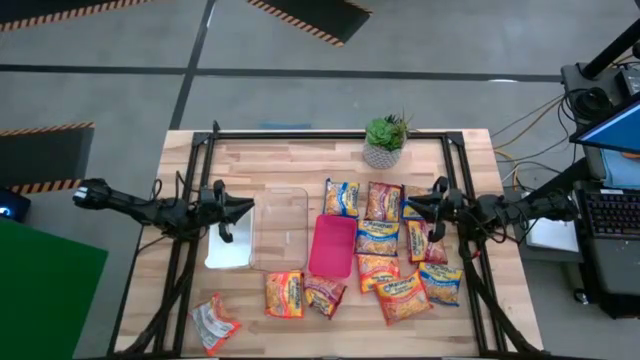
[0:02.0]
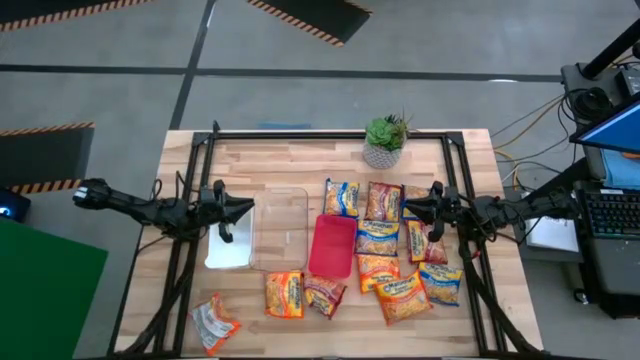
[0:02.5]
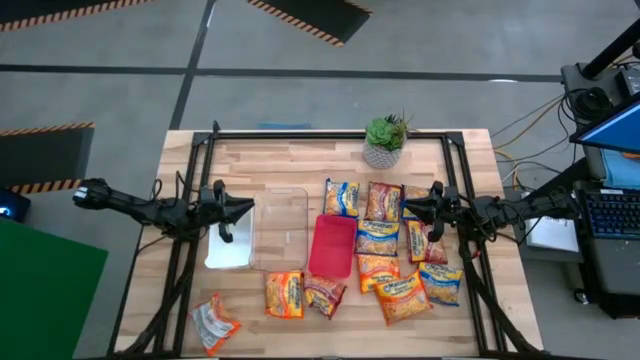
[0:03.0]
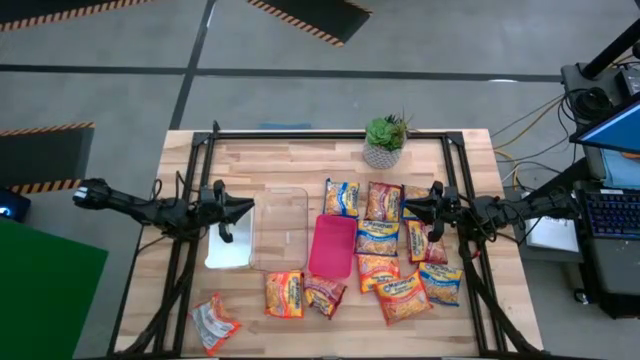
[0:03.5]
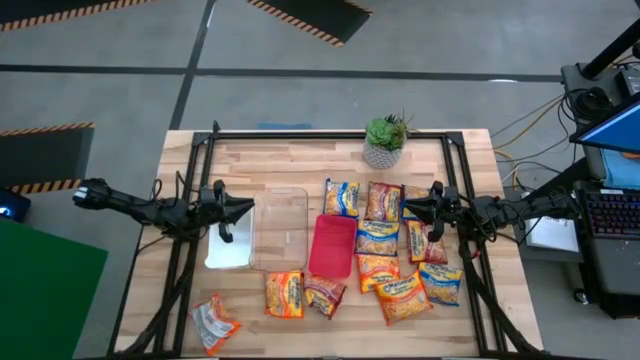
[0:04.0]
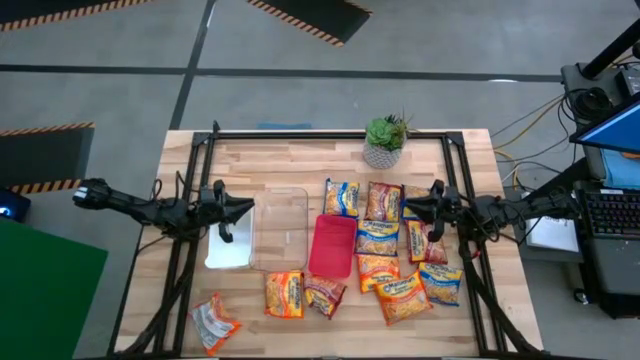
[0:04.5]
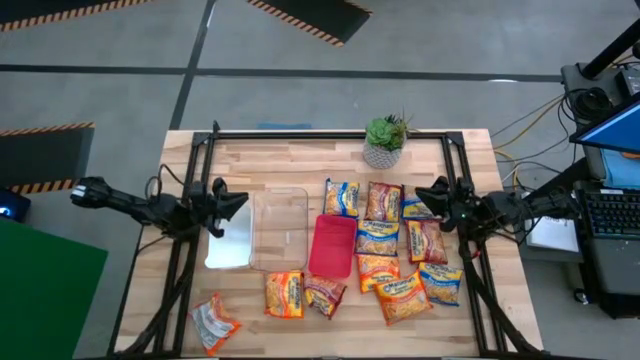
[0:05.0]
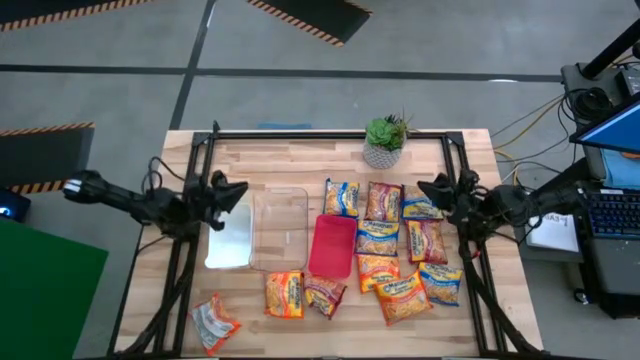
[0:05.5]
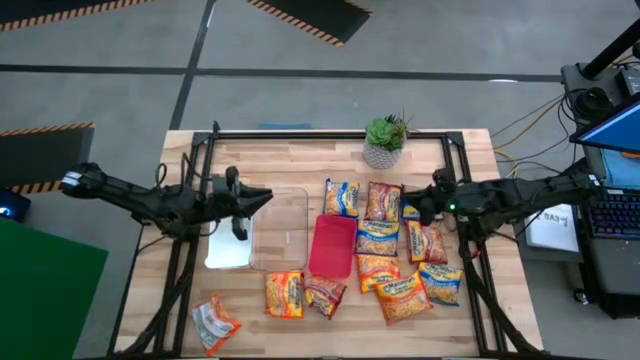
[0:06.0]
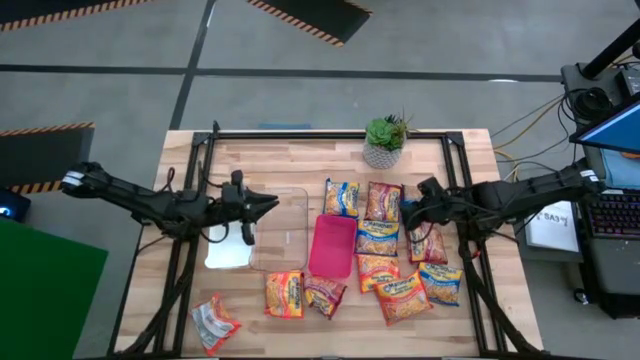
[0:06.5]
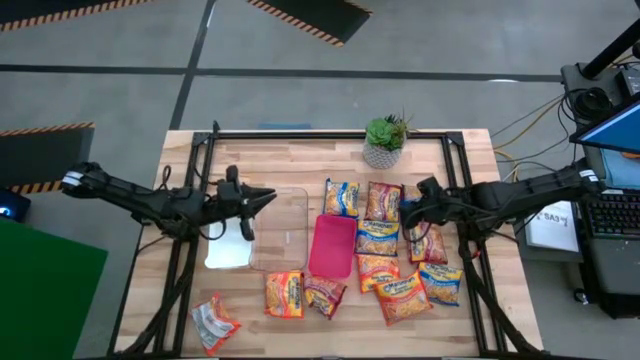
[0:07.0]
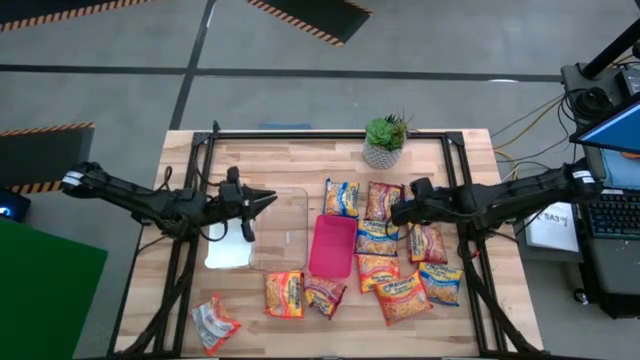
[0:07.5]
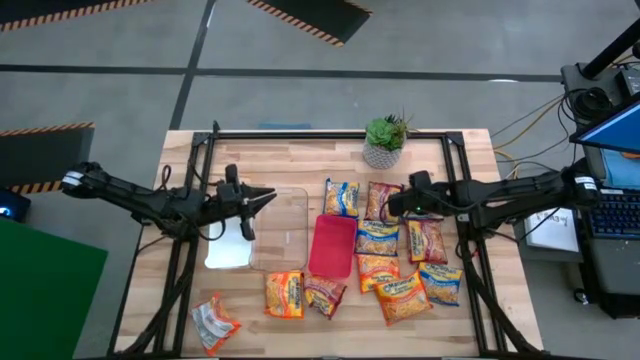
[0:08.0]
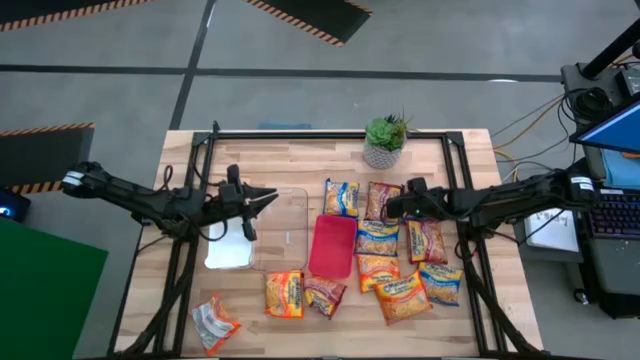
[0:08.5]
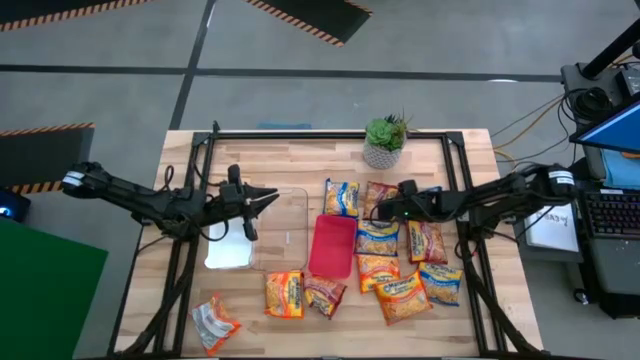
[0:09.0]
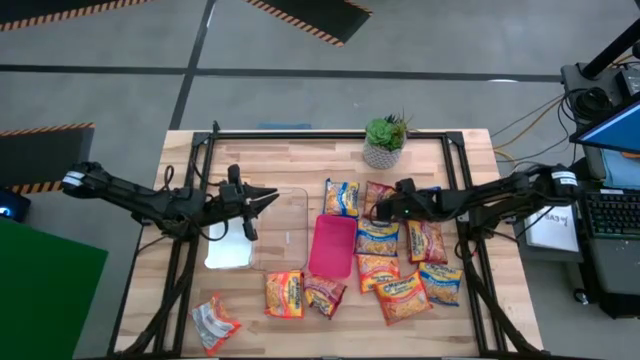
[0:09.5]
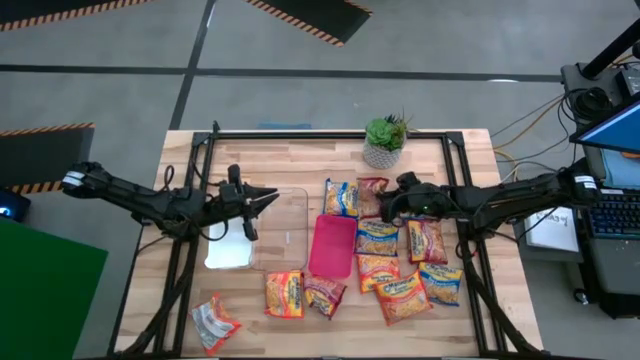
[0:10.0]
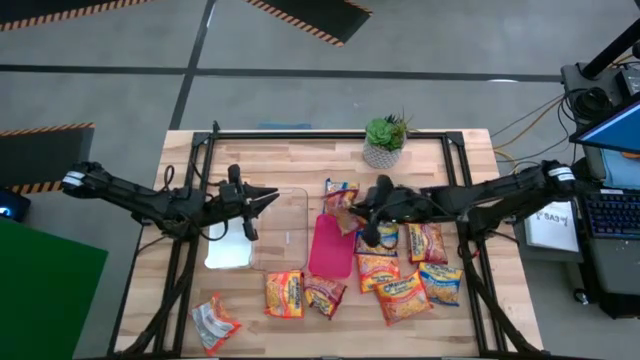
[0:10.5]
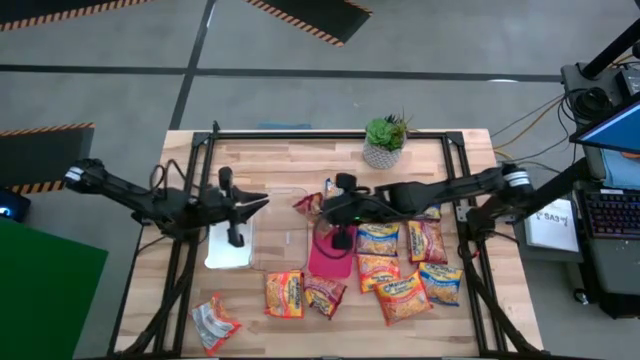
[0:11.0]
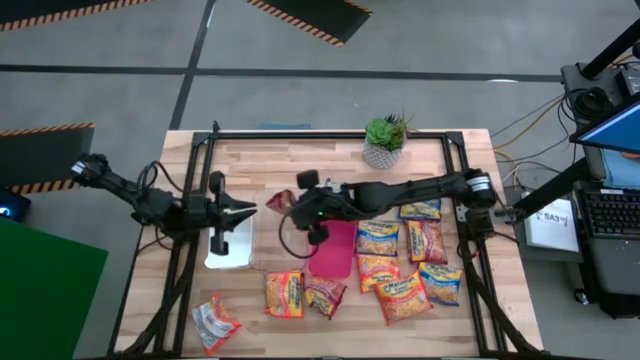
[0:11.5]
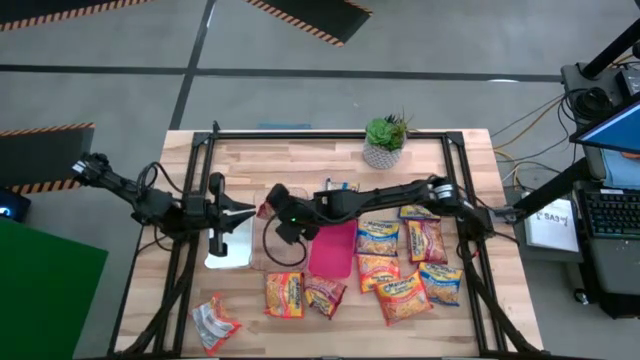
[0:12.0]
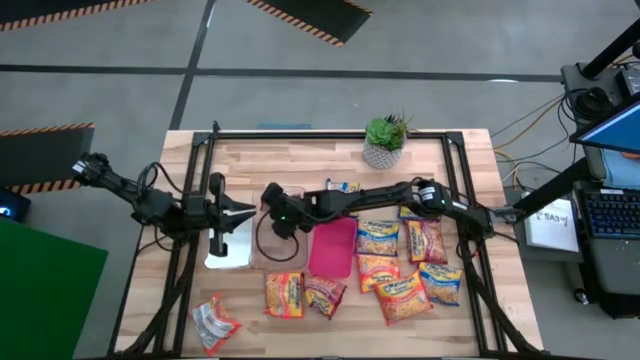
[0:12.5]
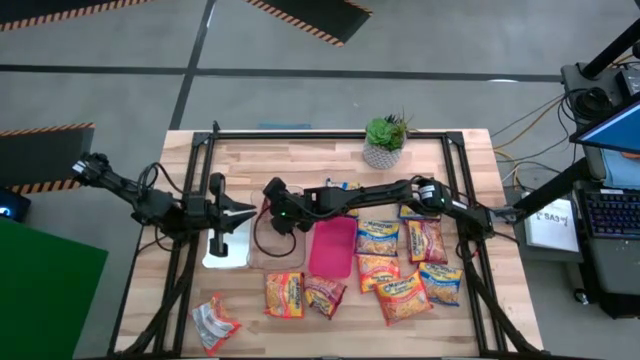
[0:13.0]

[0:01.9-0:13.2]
Task: Sort Maruchan noodles
Put the red noodle pack into the transparent bin

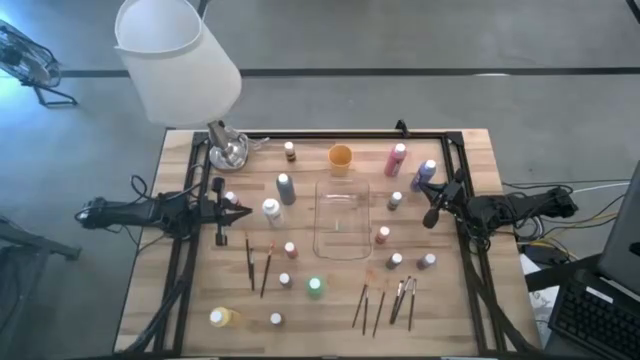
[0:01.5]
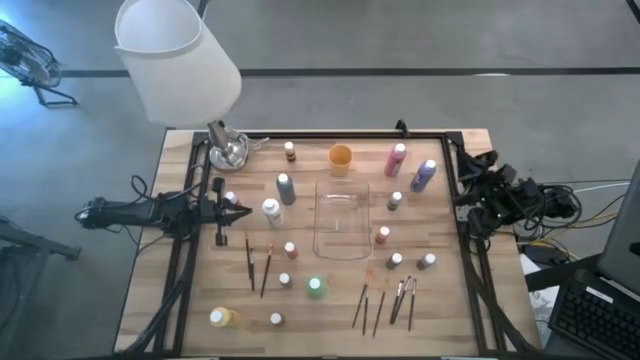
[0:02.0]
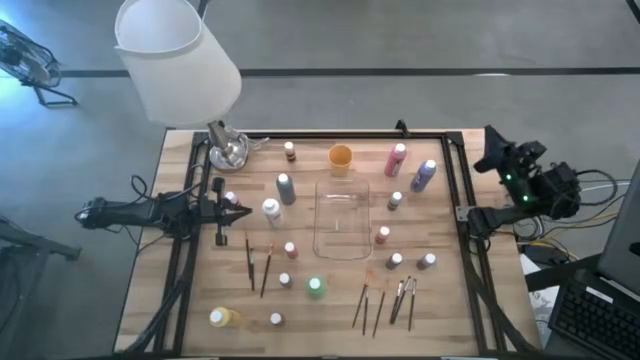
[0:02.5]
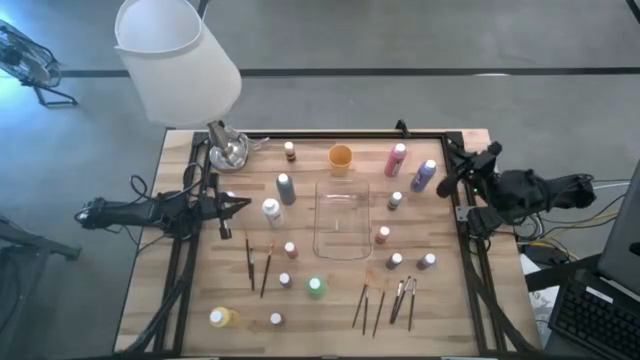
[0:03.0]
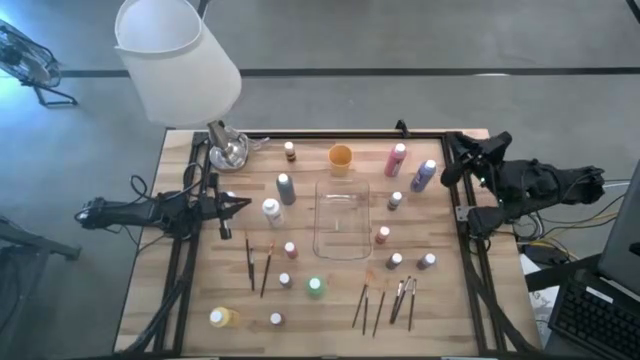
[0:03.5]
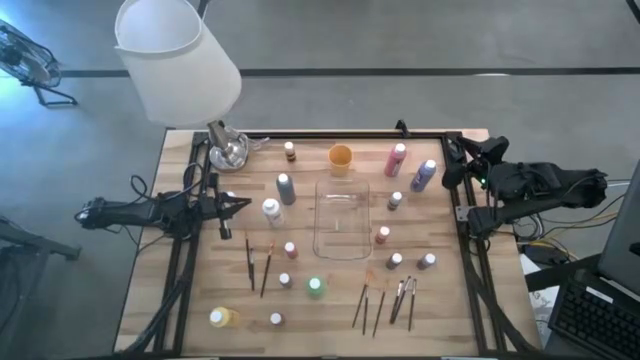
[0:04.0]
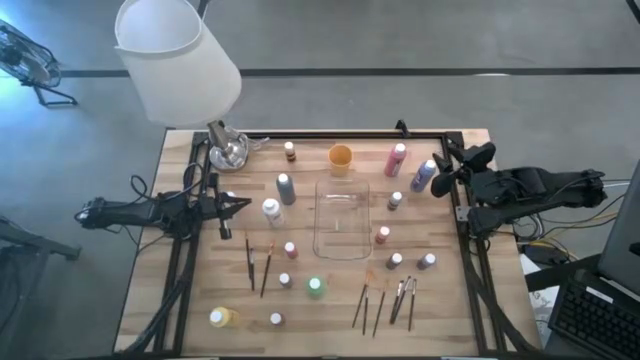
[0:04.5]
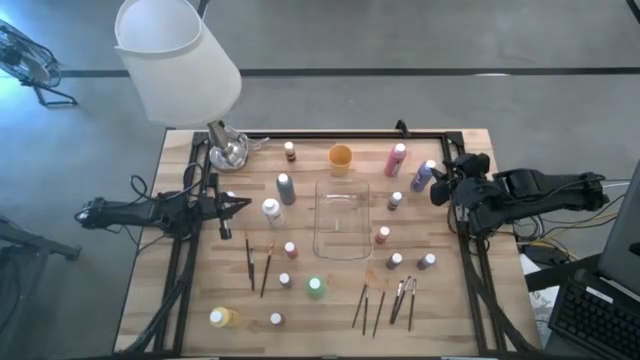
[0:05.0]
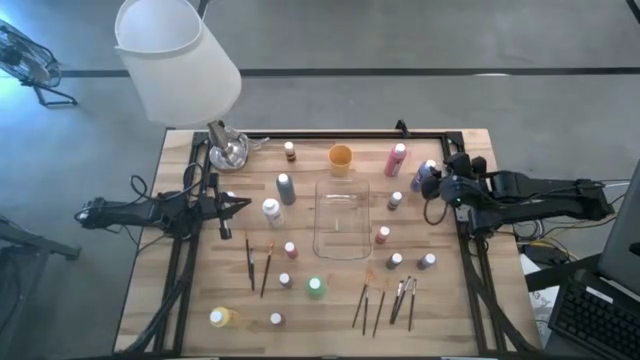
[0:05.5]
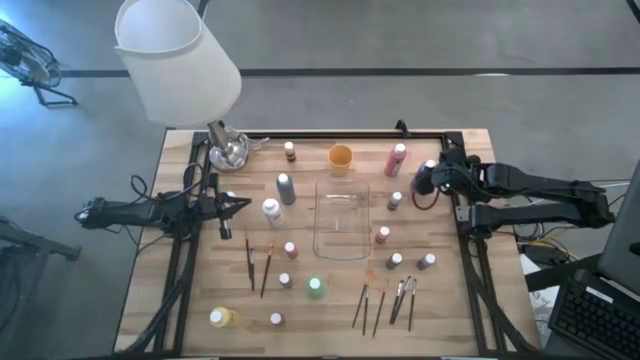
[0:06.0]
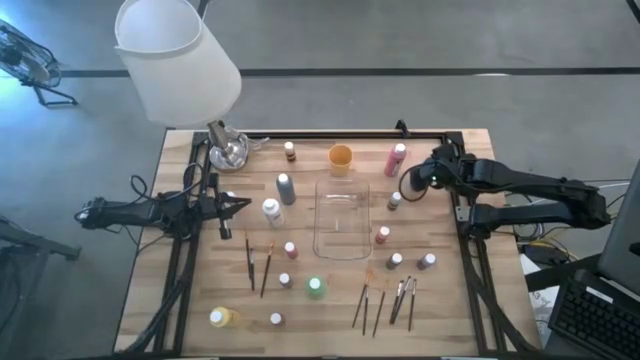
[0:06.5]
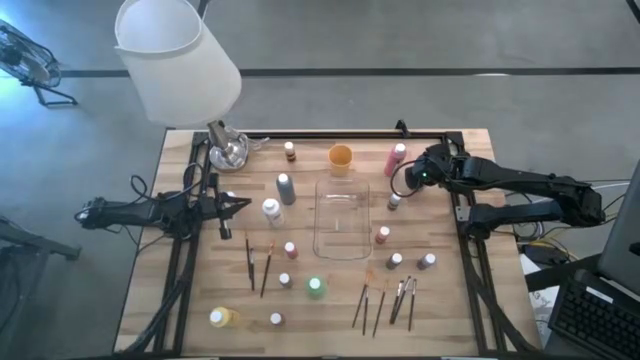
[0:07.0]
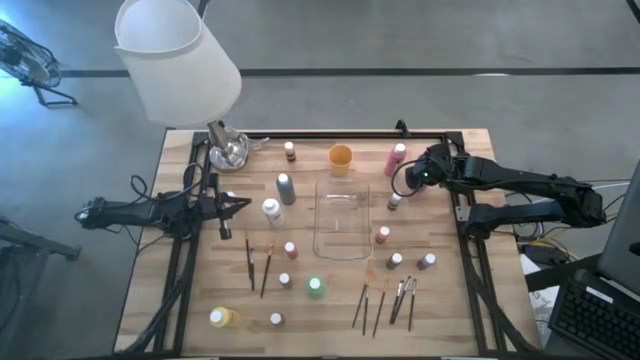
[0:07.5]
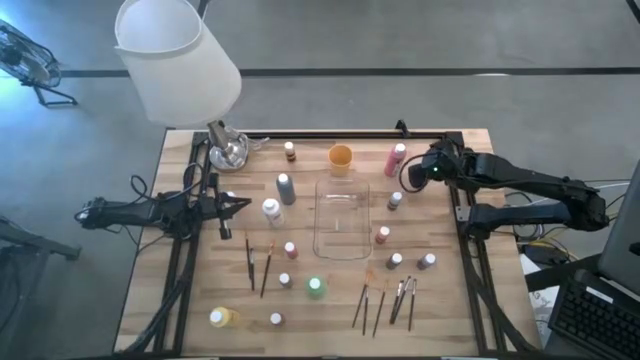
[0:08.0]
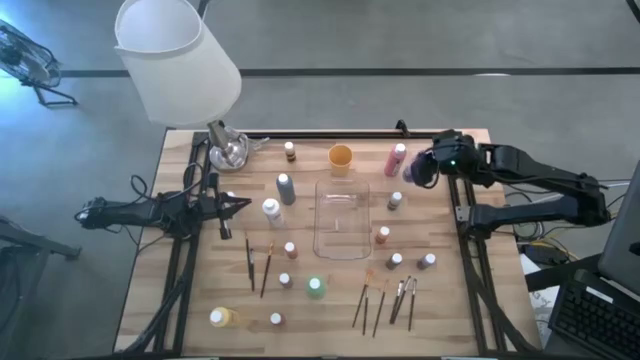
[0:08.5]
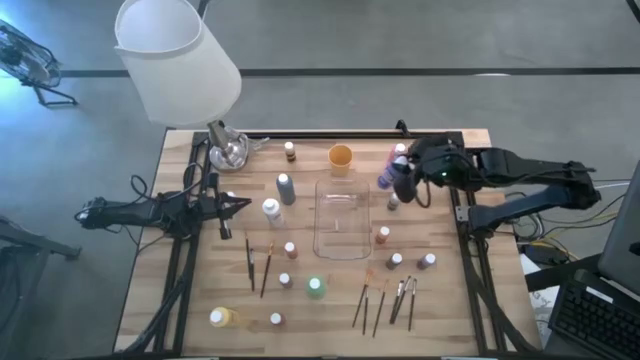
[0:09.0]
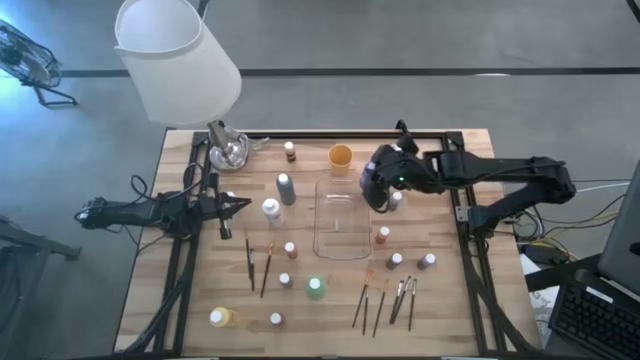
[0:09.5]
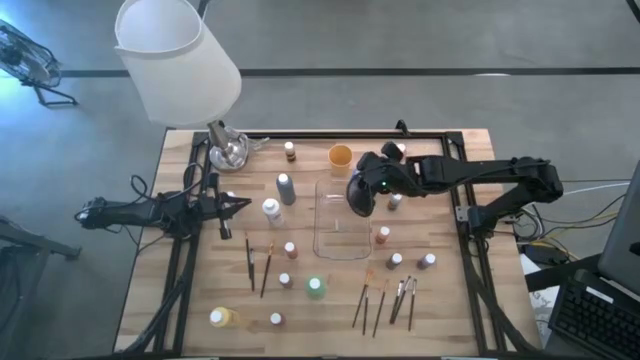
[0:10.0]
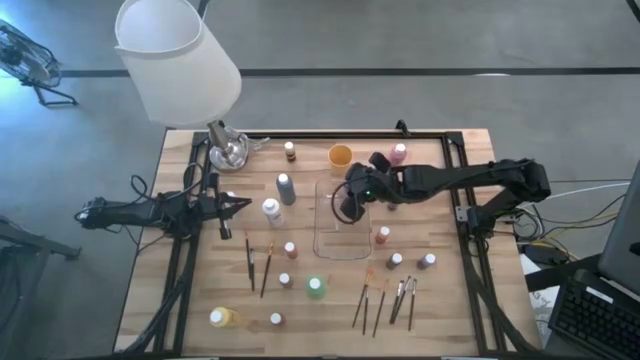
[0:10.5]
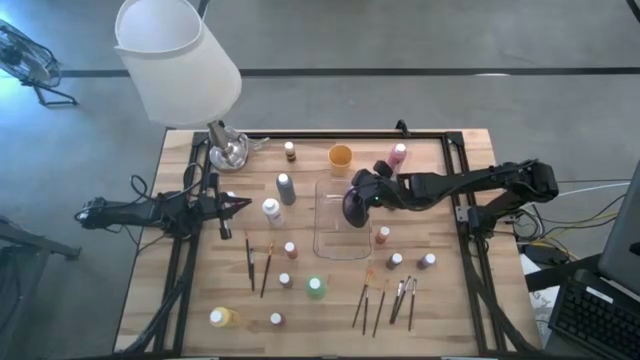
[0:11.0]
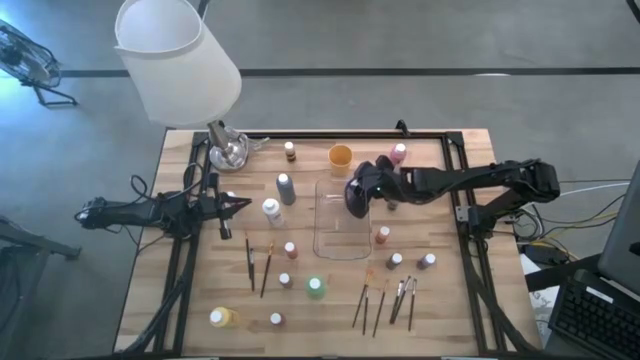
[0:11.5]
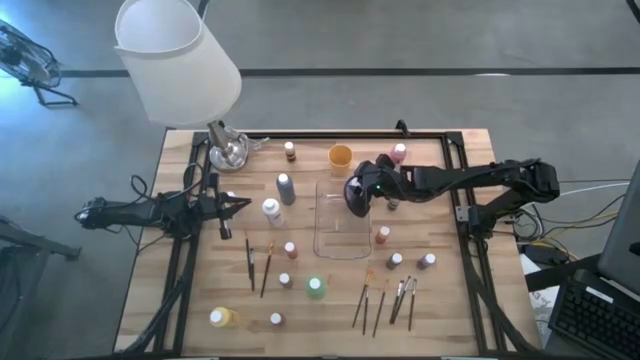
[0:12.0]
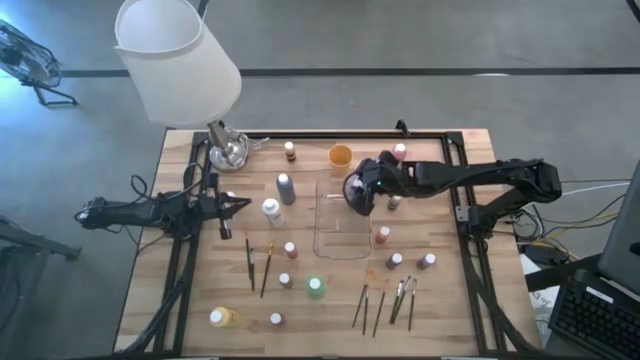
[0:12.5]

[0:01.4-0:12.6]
Task: Pick & Place Paint Supplies
Put the blue paint bottle into the transparent bin
